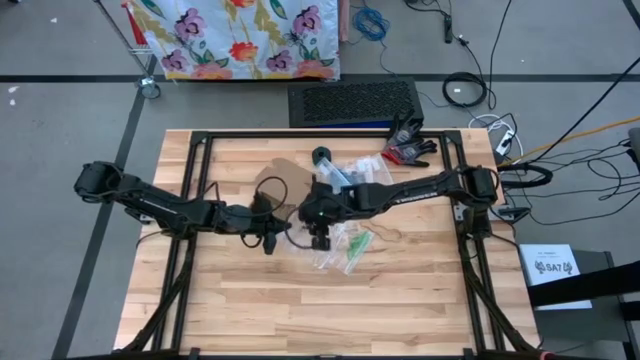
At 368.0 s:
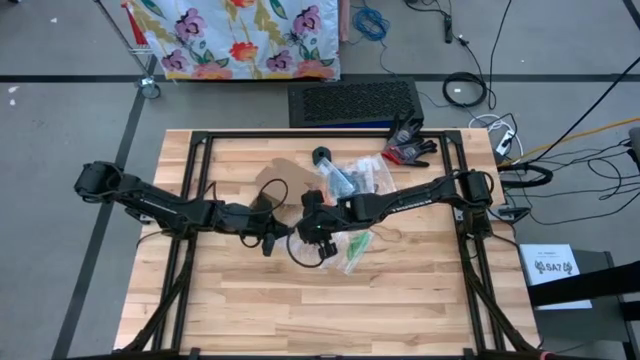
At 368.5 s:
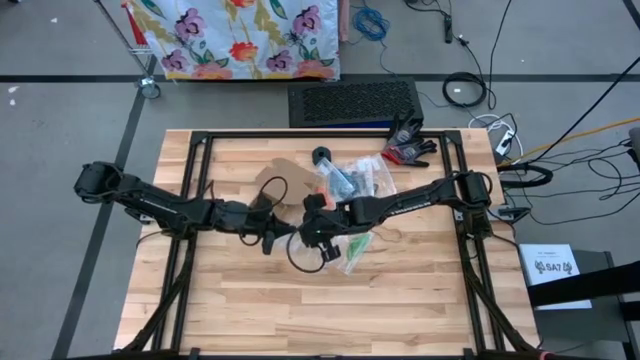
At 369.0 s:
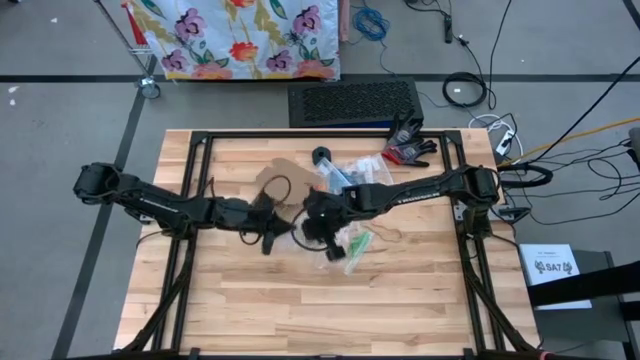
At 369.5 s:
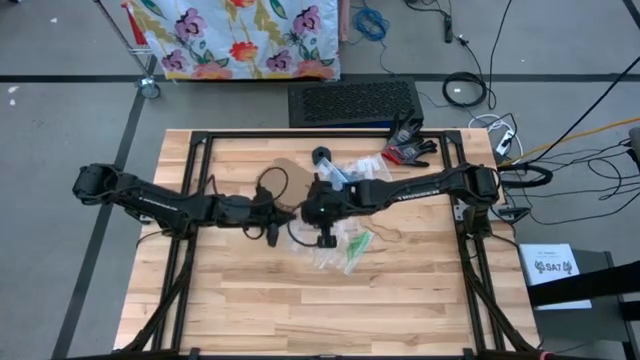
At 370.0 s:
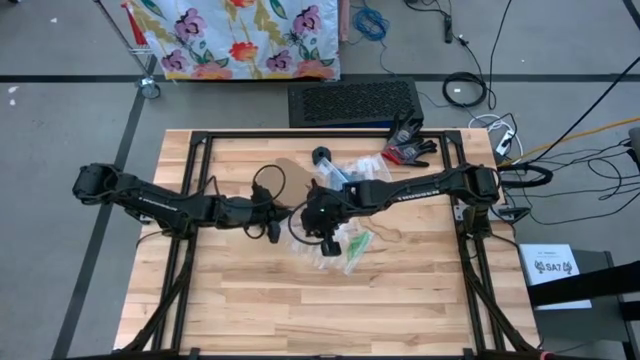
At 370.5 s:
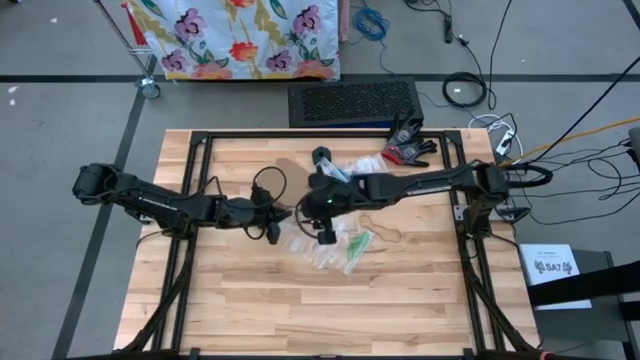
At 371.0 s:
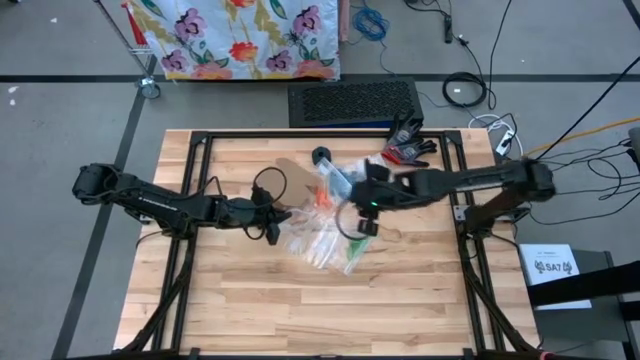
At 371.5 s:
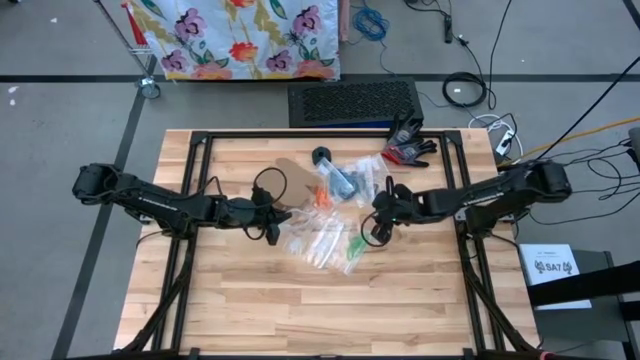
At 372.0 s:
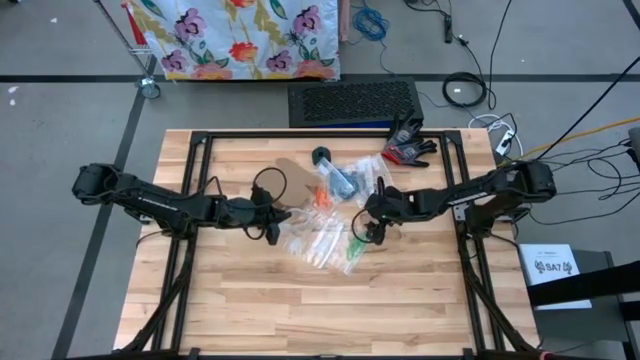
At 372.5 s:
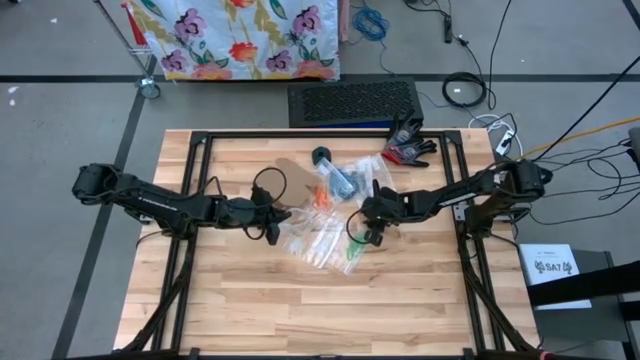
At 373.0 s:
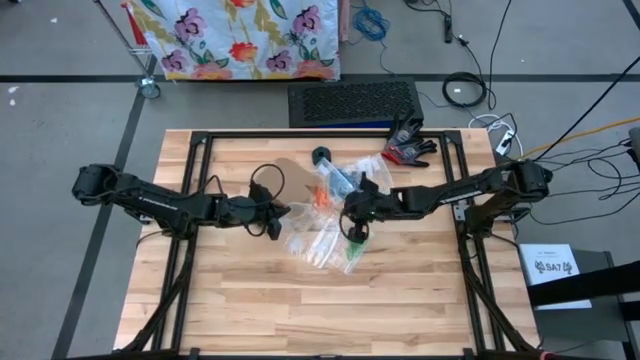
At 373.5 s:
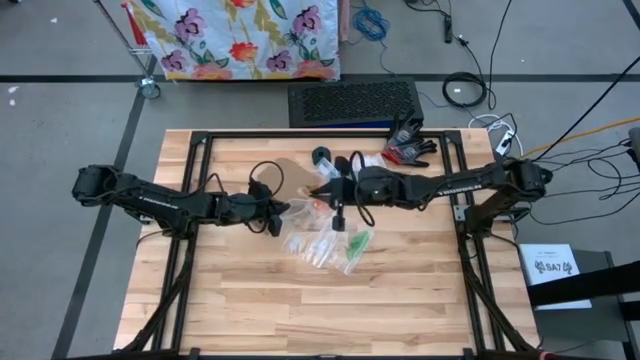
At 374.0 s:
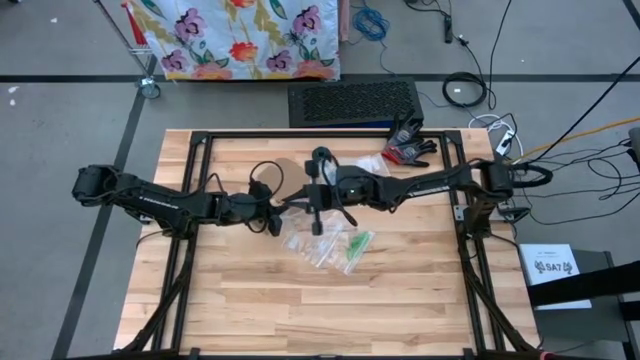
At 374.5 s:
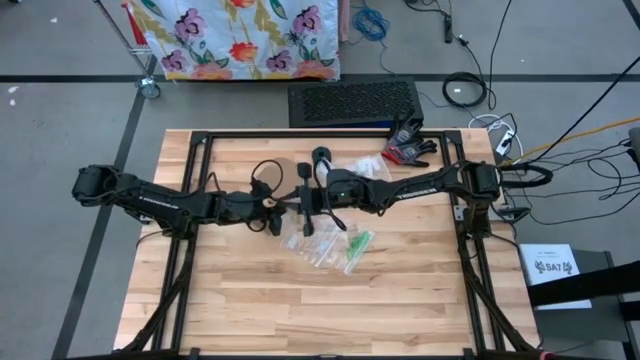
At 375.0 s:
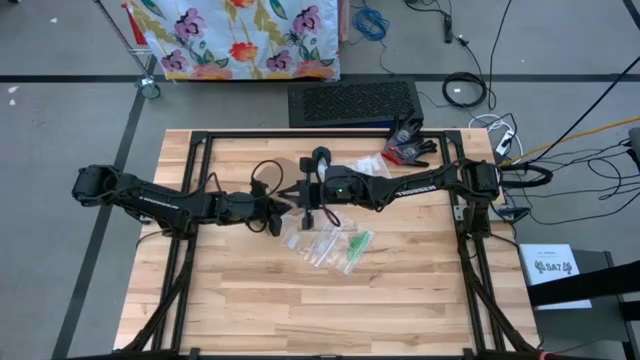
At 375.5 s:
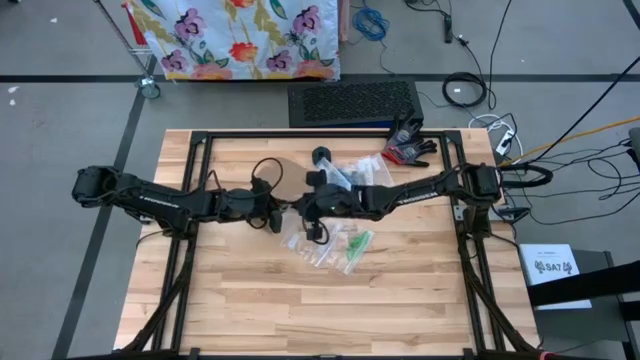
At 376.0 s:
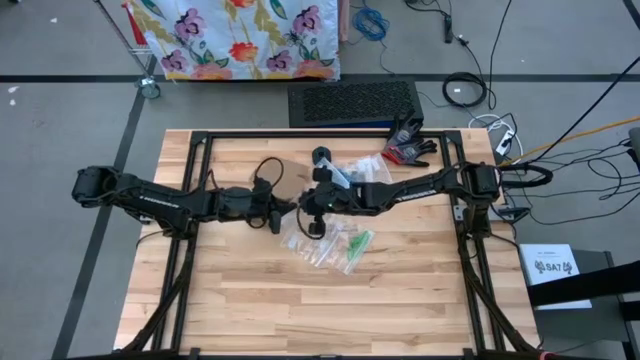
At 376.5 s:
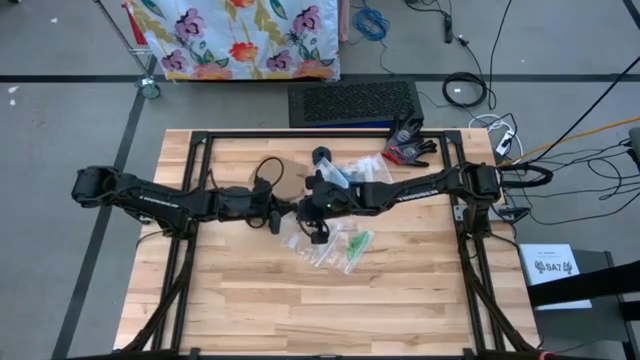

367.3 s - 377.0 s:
Task: Sort rubber bands
Put the brown rubber band into the transparent zip bag

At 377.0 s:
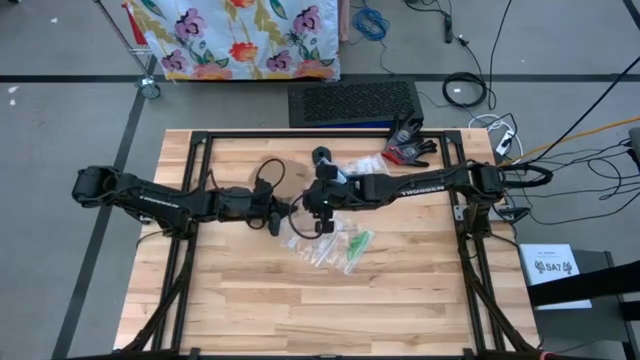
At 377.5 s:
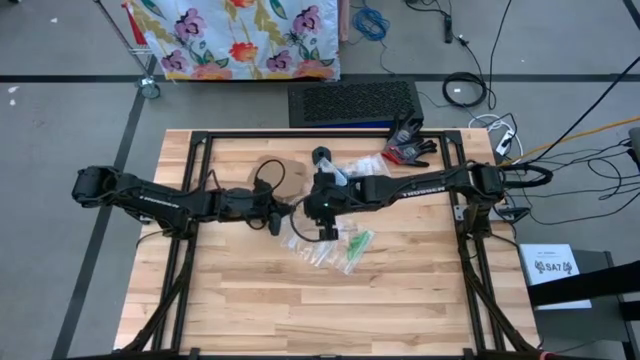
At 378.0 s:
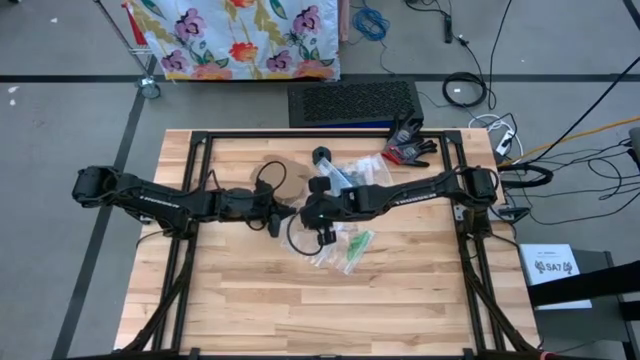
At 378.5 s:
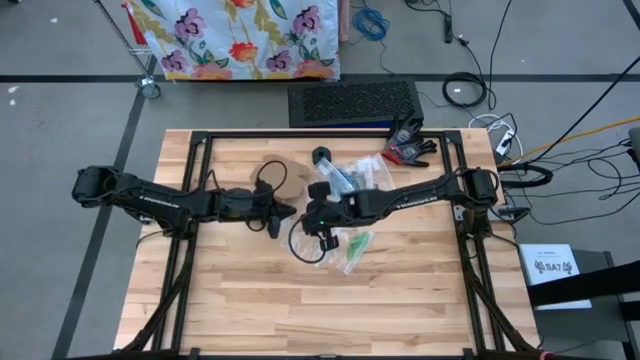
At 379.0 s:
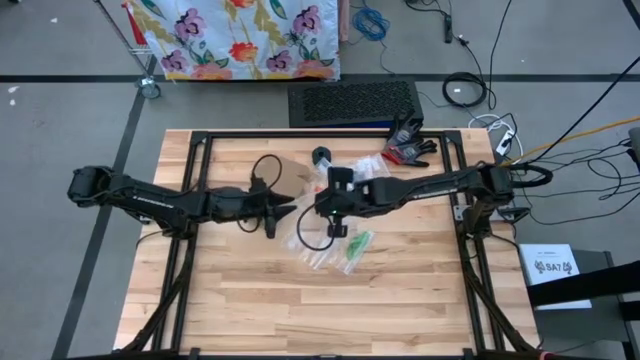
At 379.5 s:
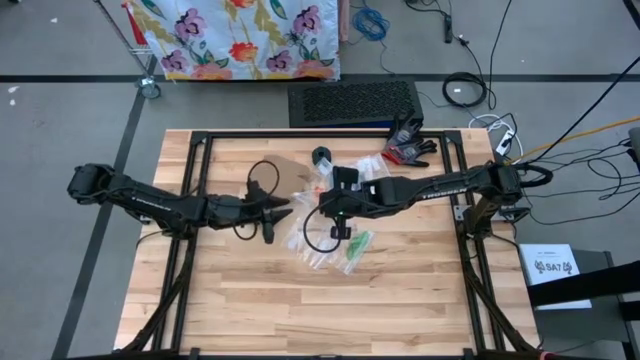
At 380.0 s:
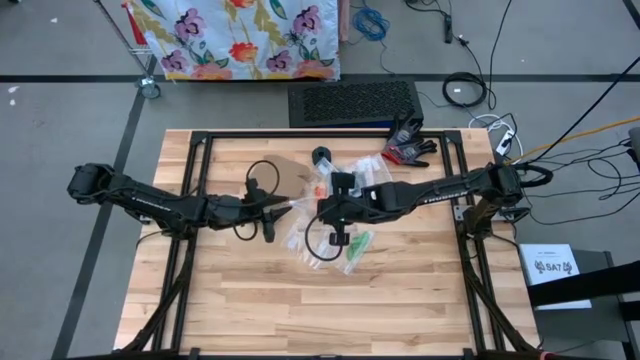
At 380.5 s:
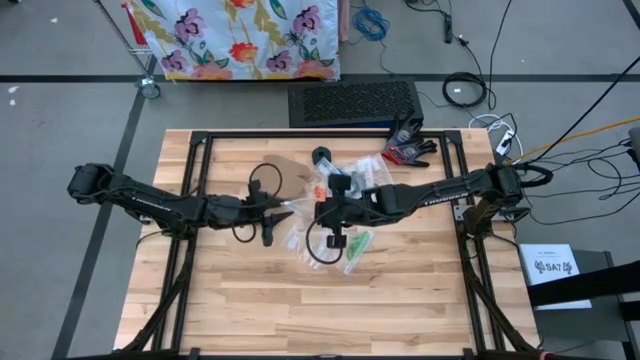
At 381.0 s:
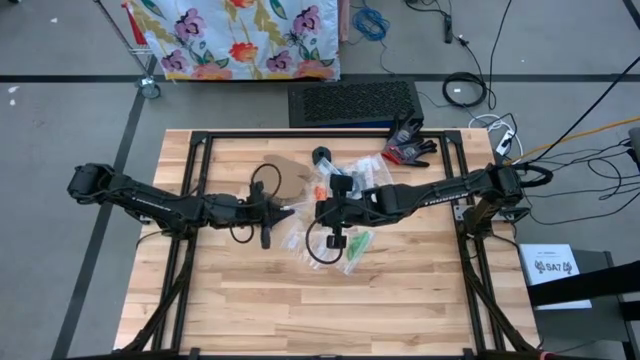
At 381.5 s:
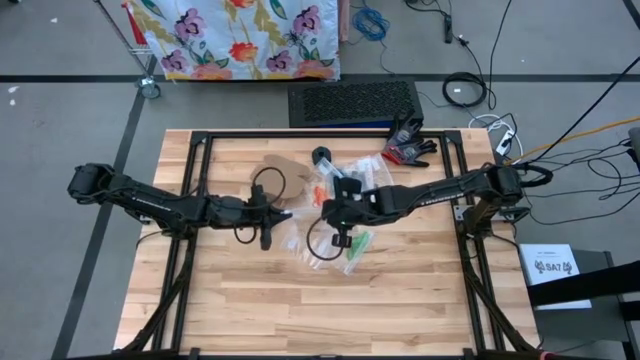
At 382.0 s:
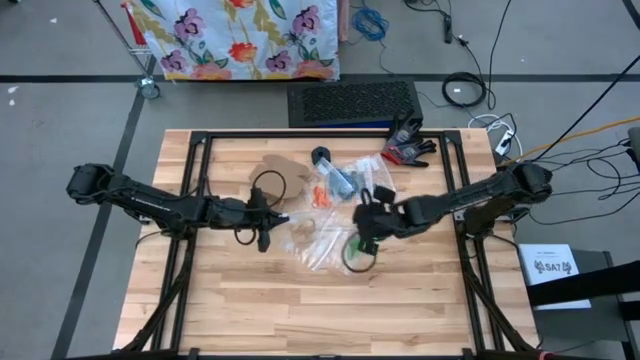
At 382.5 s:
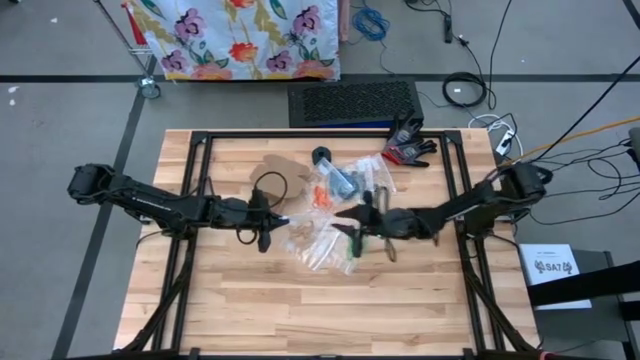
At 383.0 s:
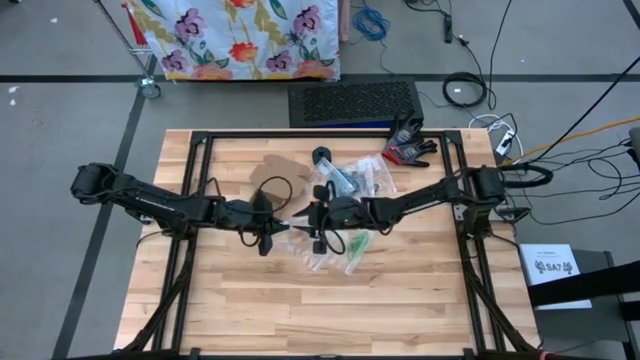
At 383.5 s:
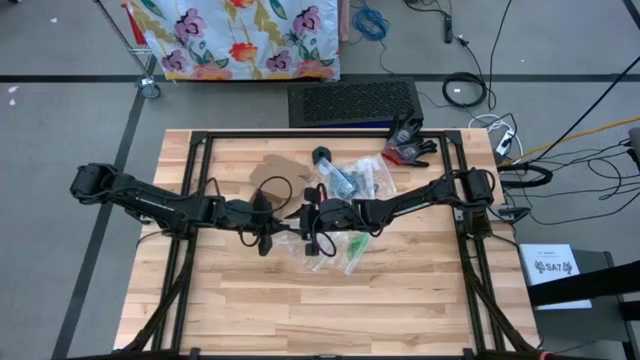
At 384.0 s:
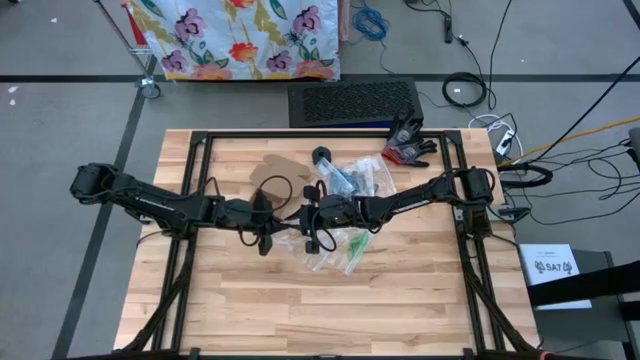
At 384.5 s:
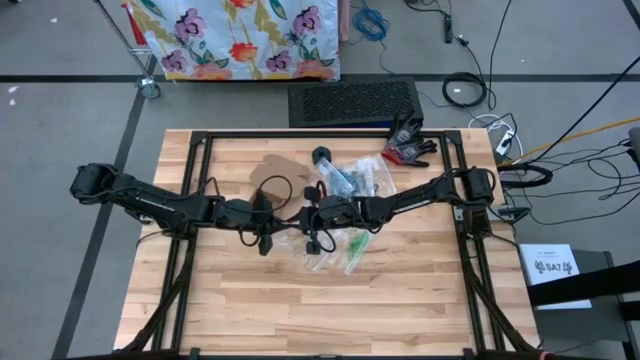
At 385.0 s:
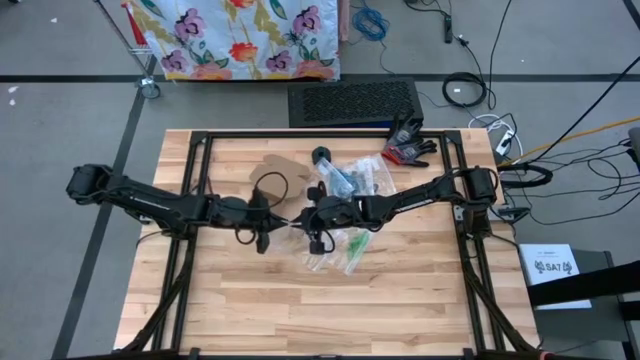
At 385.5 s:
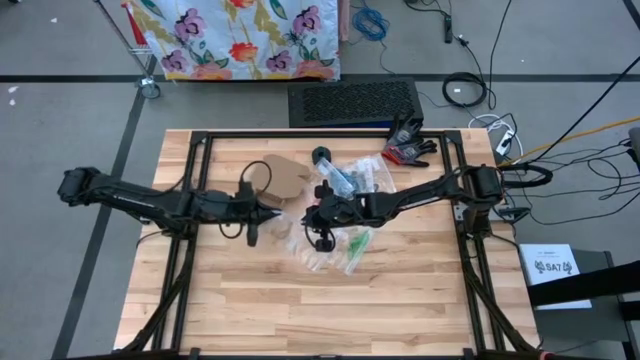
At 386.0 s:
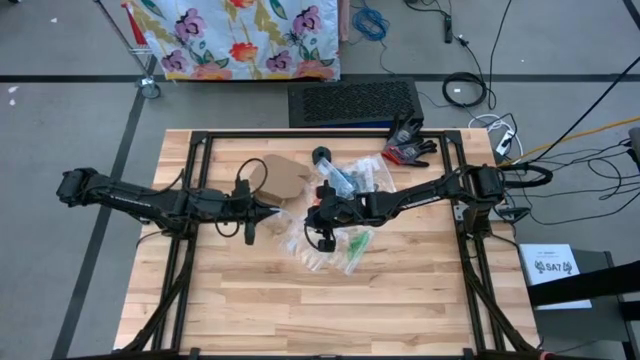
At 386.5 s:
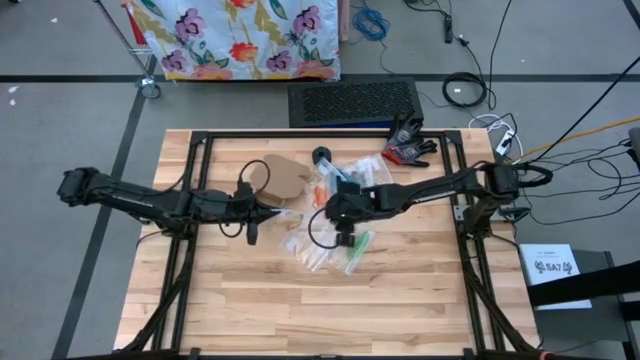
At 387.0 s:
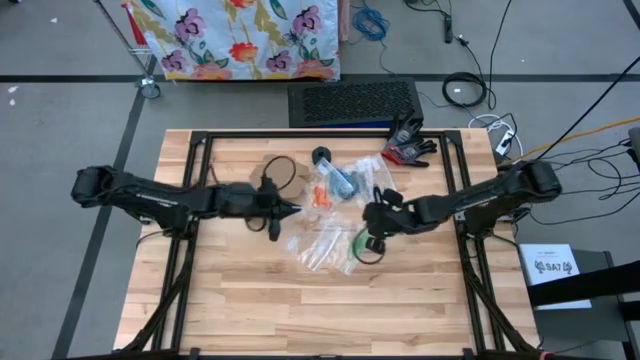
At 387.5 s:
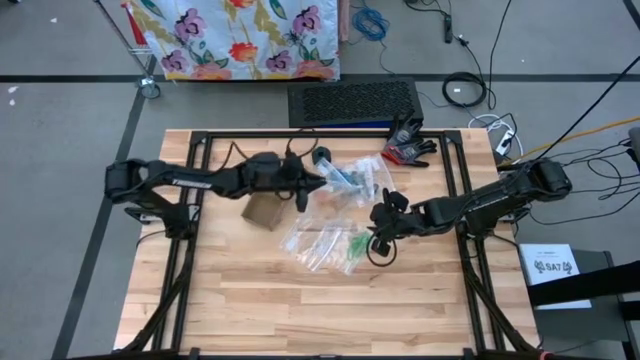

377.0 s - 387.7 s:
Close the transparent zip bag

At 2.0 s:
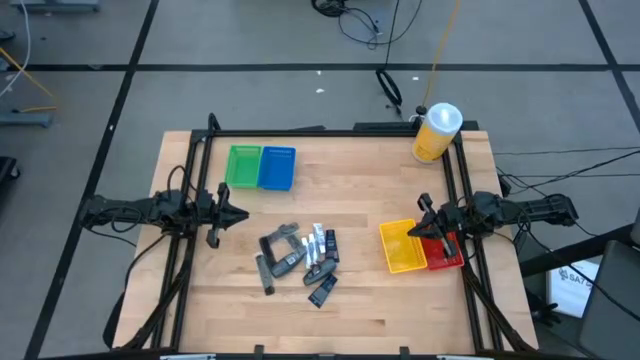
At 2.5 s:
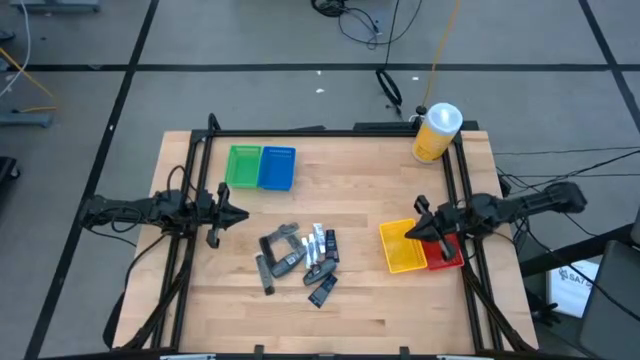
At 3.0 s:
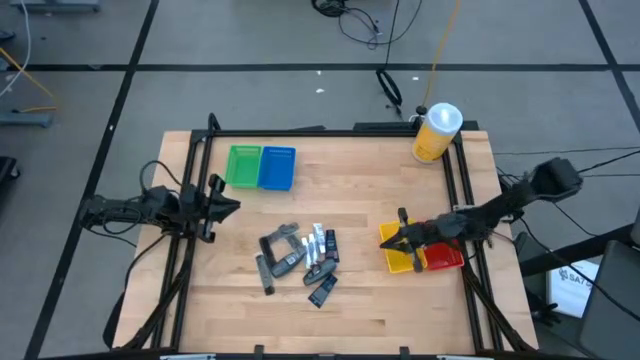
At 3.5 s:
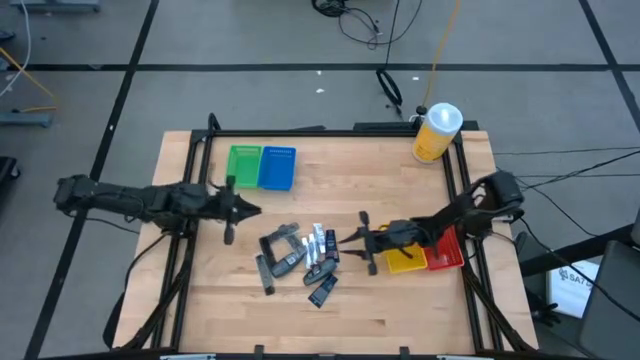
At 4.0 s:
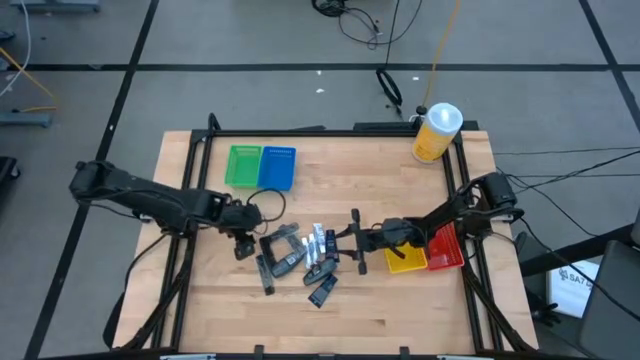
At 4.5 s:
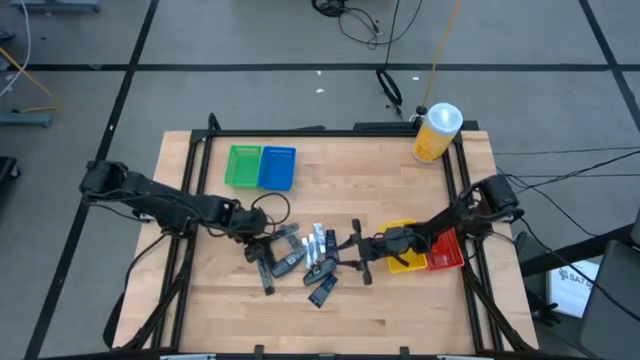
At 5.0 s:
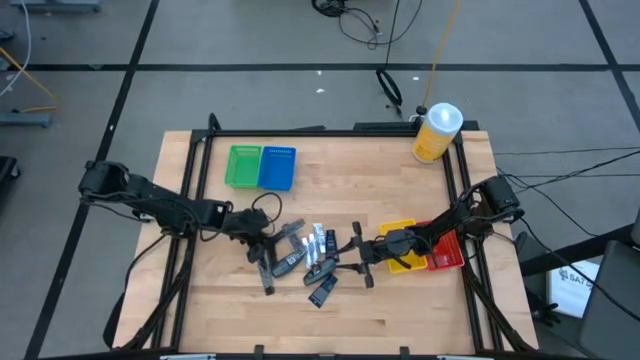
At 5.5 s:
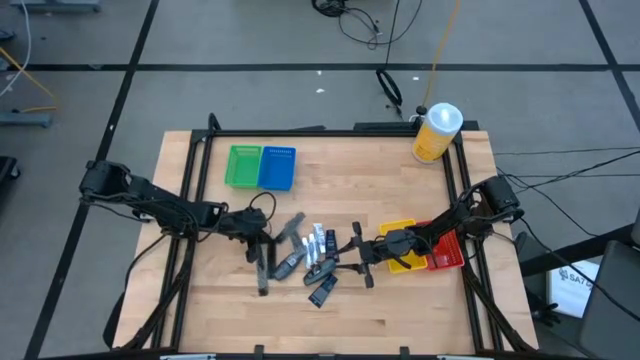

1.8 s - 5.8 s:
Task: Pick & Place Travel size toiletries
Put the black comb into the blue bin
